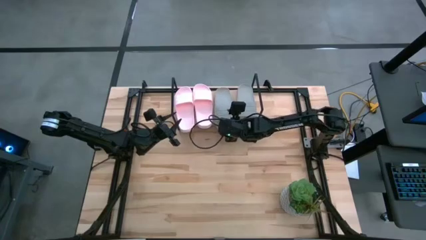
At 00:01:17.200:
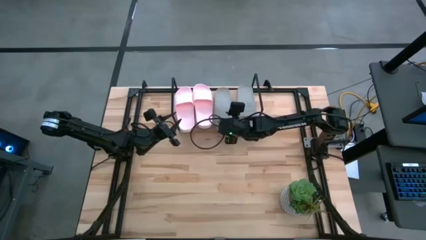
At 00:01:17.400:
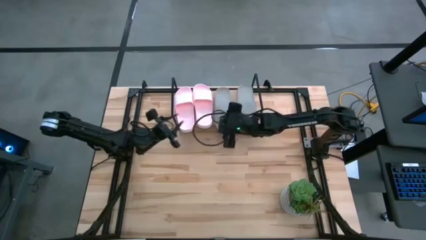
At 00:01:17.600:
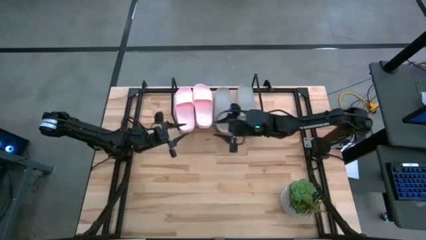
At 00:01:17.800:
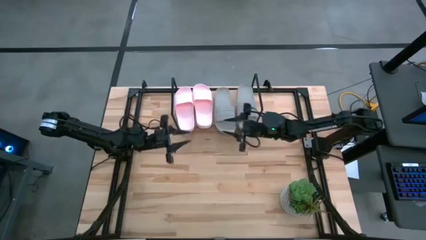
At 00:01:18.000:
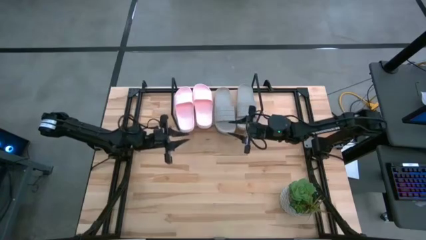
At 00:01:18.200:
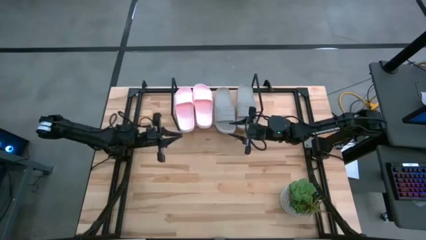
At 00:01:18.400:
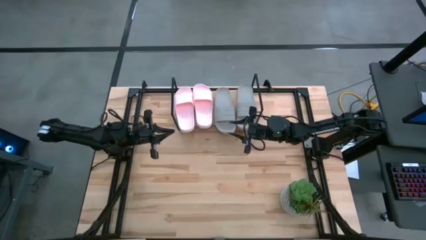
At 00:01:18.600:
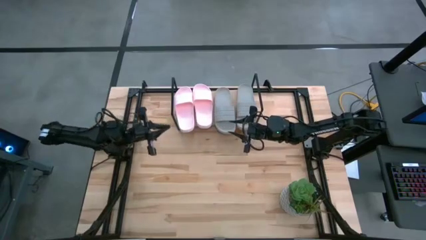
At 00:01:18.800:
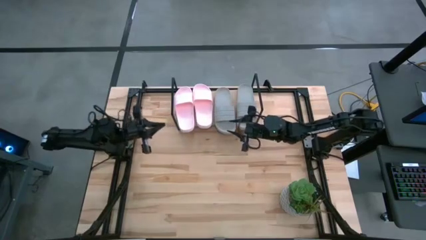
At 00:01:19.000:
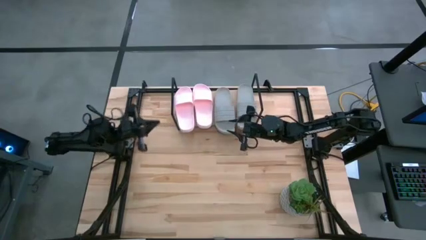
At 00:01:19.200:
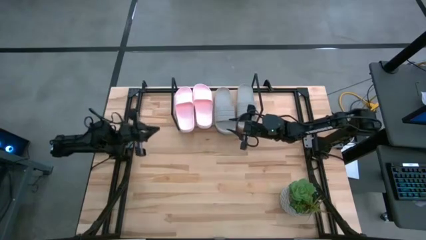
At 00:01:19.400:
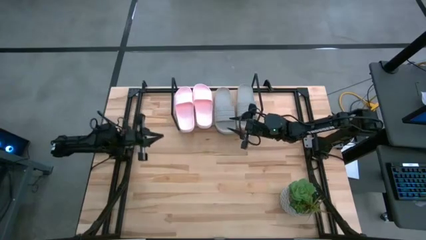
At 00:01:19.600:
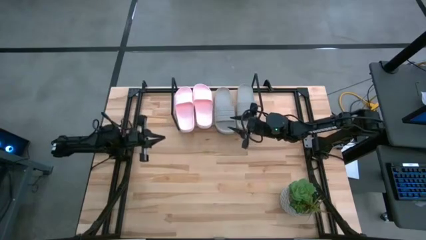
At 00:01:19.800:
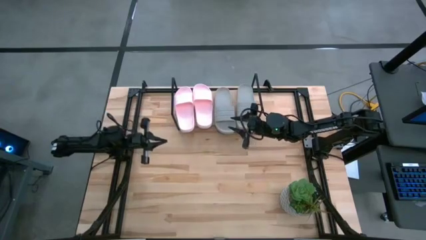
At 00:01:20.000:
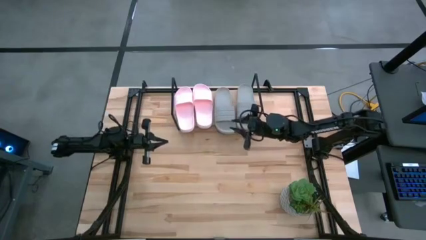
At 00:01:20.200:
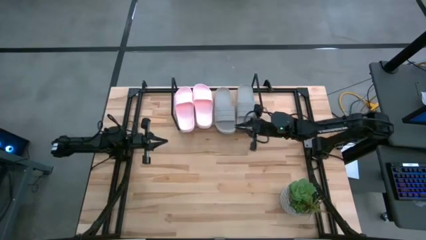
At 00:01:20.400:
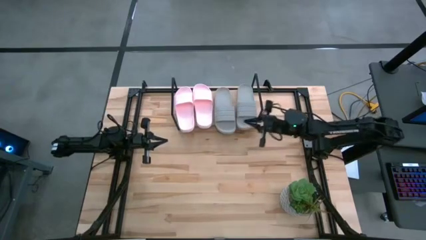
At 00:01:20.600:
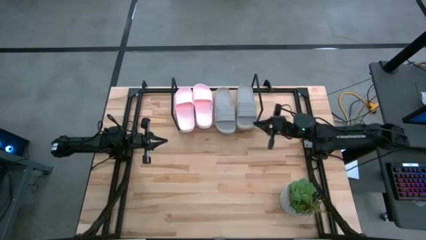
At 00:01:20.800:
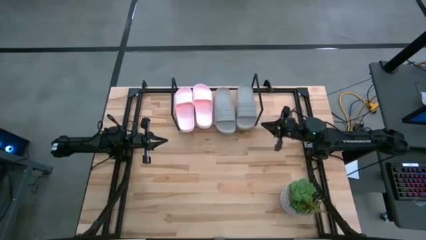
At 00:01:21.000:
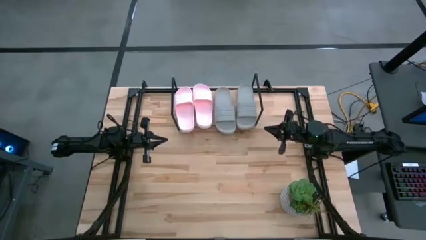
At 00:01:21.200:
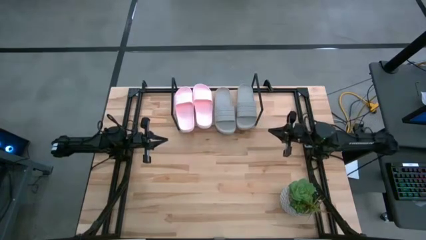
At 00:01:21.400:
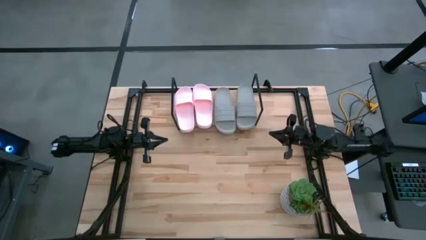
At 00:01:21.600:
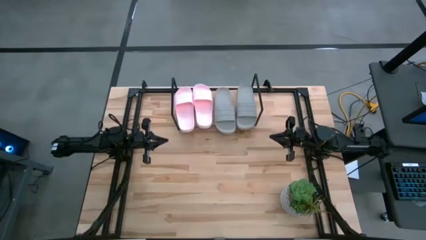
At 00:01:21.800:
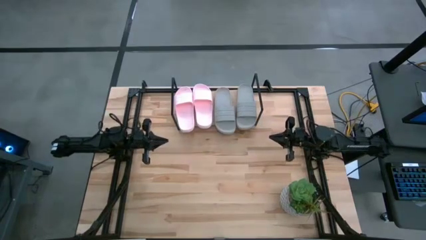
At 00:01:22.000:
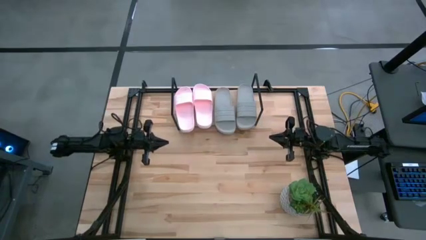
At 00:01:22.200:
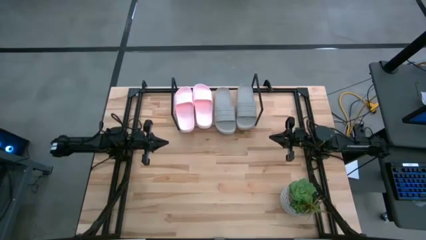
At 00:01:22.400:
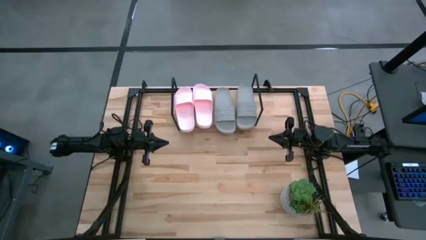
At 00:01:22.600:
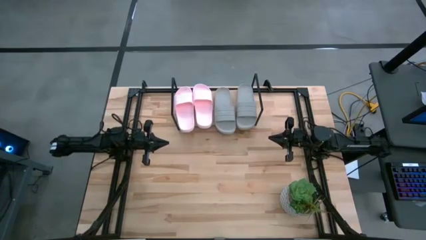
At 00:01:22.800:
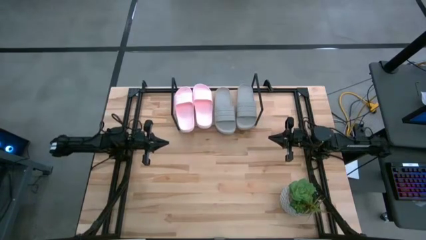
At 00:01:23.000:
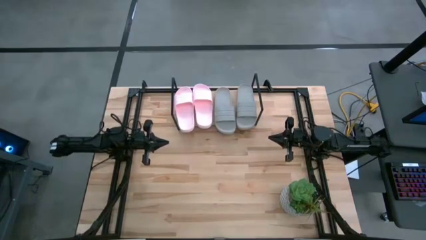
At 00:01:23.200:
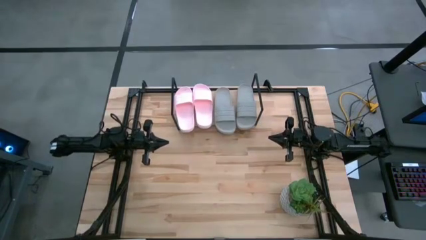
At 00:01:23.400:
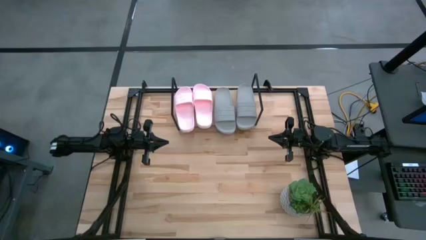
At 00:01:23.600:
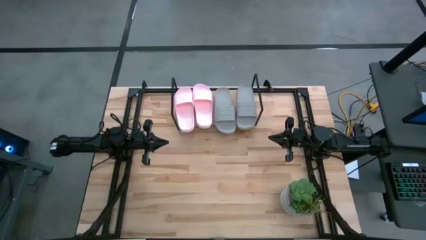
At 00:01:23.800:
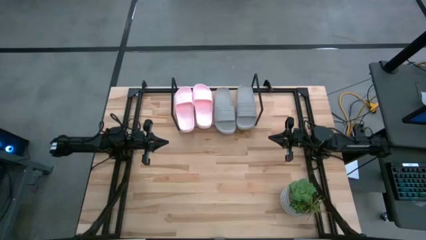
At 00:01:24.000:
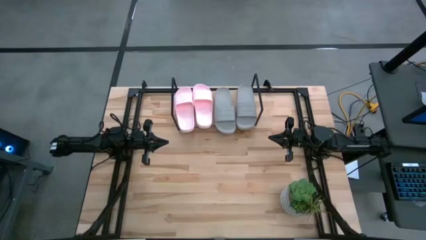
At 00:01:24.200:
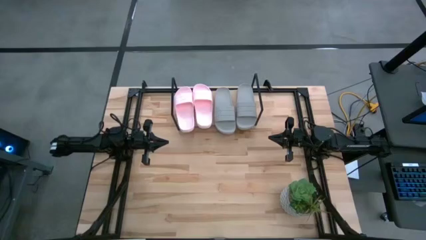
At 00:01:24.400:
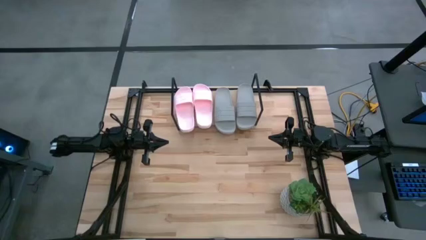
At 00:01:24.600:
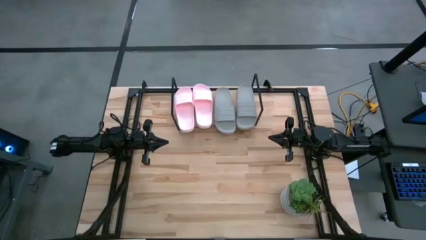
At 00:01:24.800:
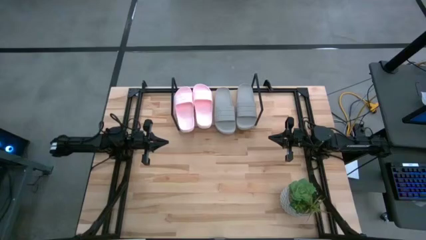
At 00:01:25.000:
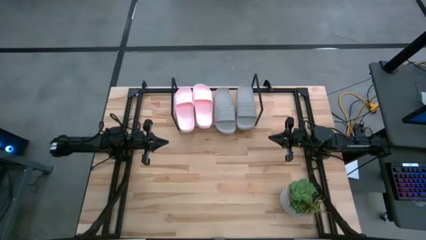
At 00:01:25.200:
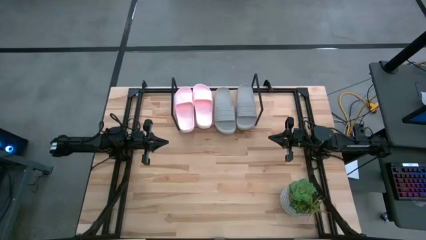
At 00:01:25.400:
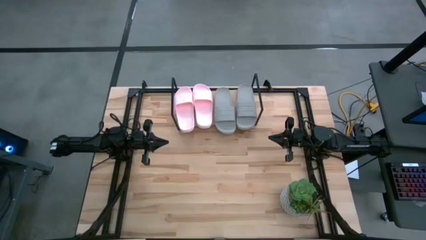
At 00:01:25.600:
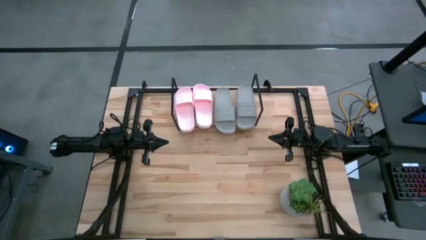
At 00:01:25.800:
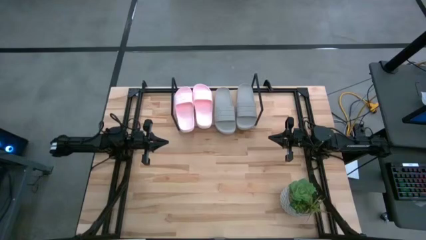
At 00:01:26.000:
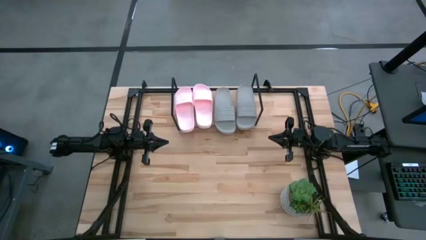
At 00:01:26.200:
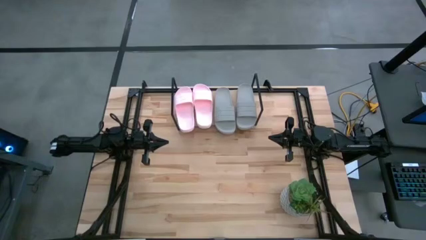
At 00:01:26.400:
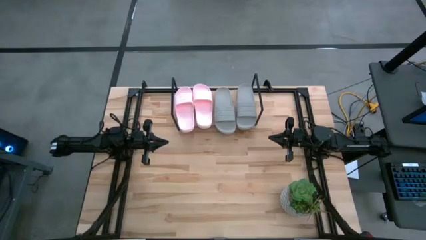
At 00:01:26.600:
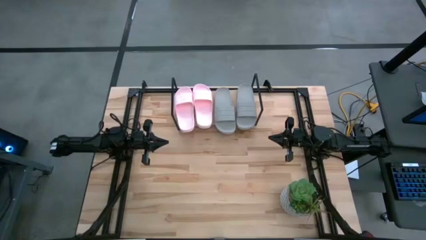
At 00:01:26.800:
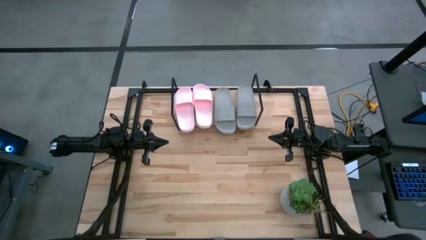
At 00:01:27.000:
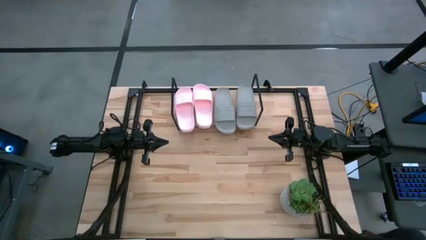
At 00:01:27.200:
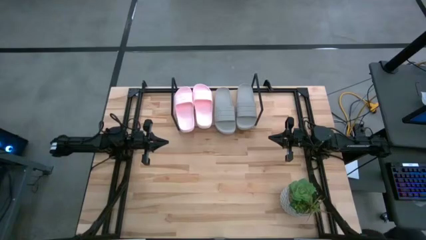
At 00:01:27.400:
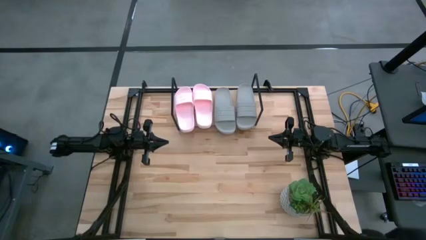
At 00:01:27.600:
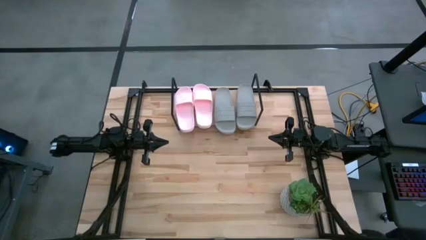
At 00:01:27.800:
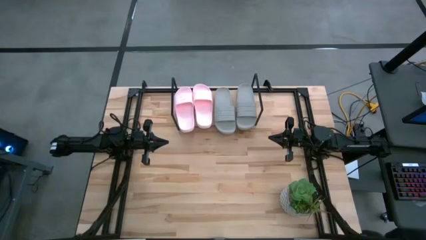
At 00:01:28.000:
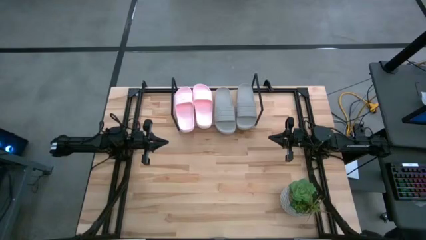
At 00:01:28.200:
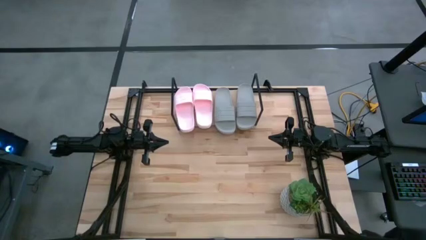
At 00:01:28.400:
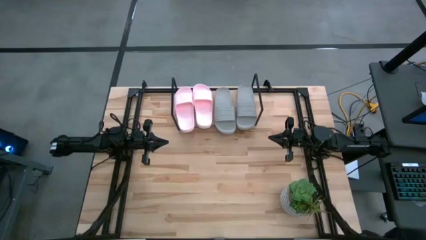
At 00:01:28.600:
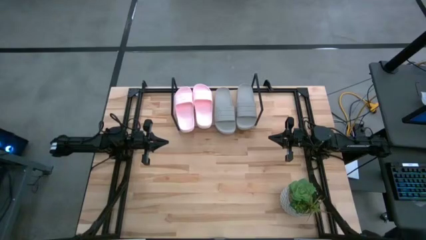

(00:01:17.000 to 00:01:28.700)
Task: Pick and place slides into the shelf
Return to Home Position

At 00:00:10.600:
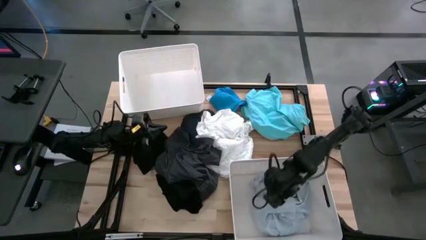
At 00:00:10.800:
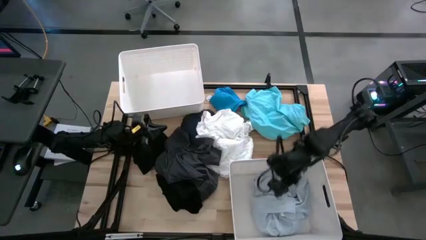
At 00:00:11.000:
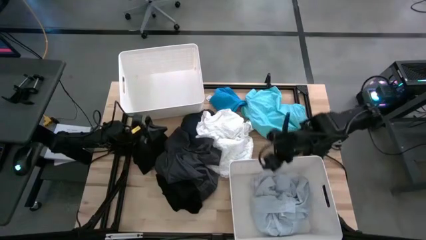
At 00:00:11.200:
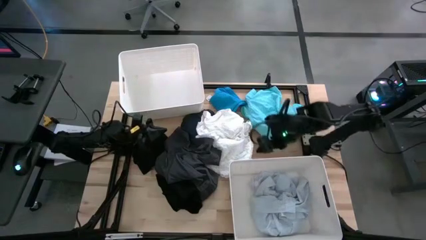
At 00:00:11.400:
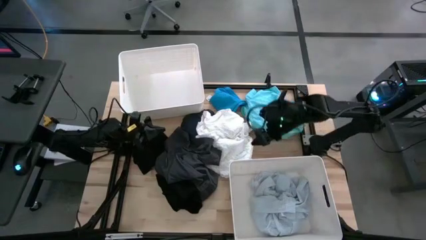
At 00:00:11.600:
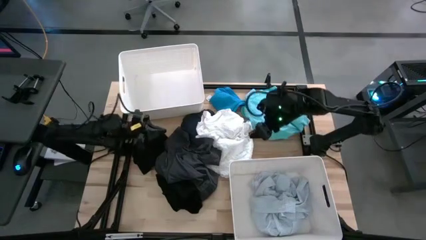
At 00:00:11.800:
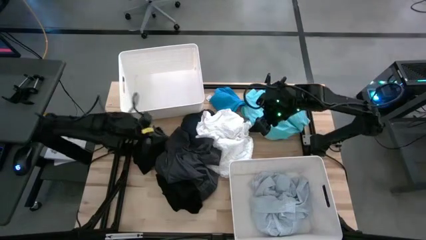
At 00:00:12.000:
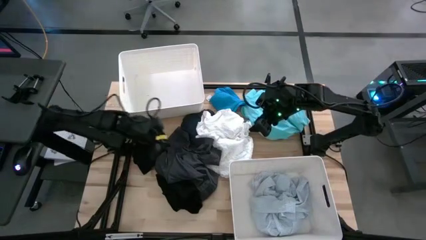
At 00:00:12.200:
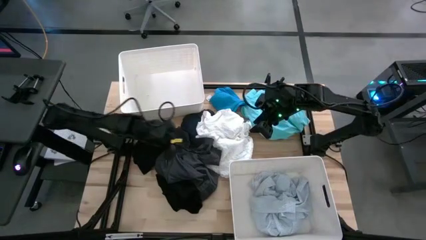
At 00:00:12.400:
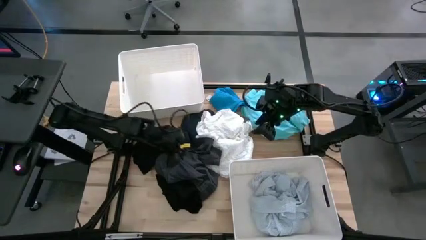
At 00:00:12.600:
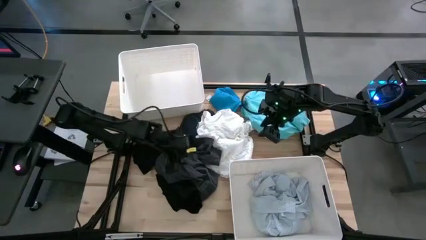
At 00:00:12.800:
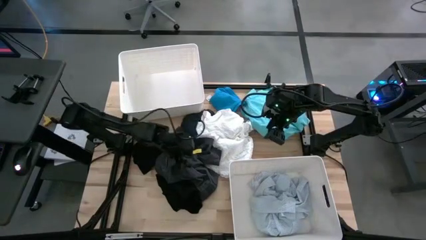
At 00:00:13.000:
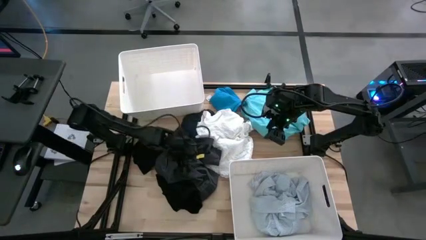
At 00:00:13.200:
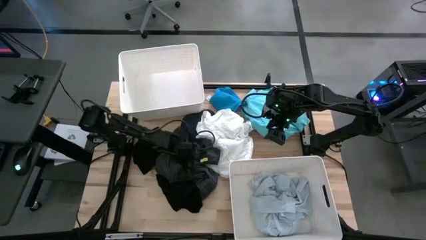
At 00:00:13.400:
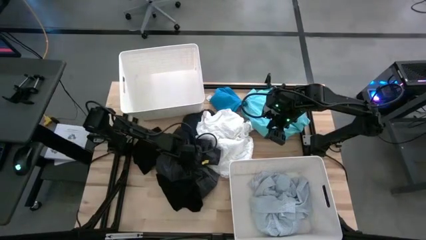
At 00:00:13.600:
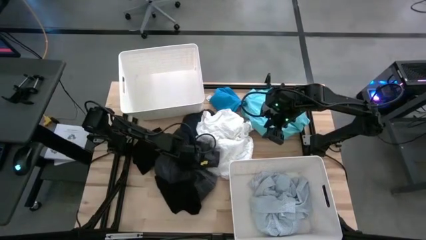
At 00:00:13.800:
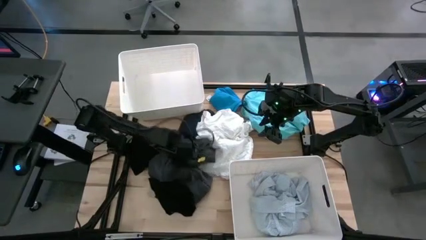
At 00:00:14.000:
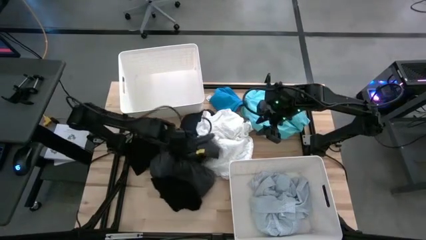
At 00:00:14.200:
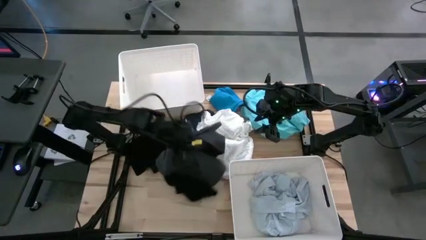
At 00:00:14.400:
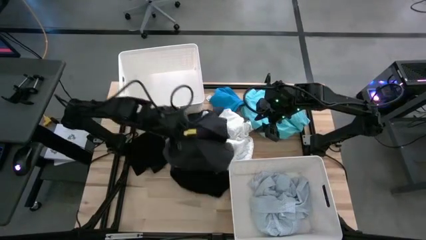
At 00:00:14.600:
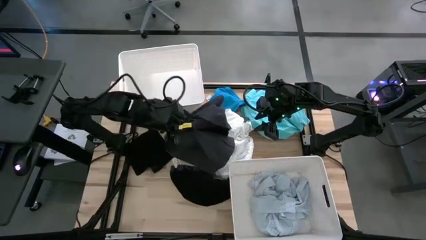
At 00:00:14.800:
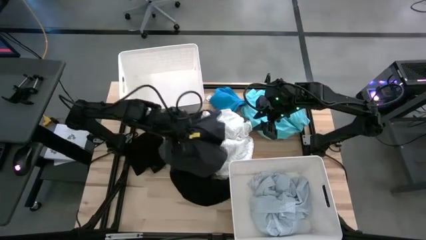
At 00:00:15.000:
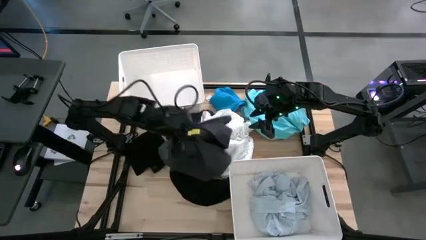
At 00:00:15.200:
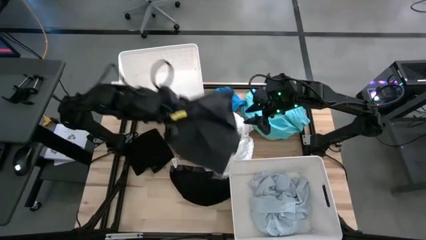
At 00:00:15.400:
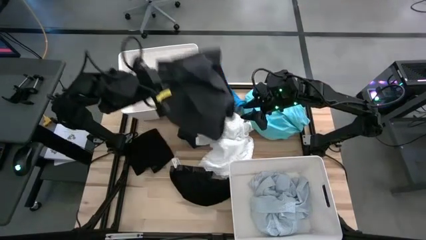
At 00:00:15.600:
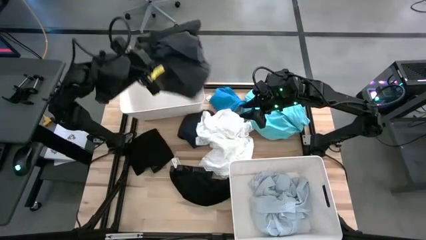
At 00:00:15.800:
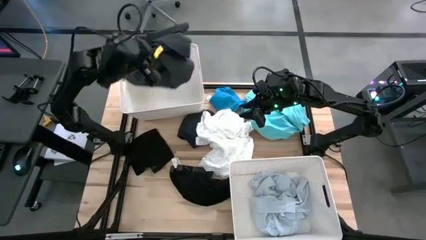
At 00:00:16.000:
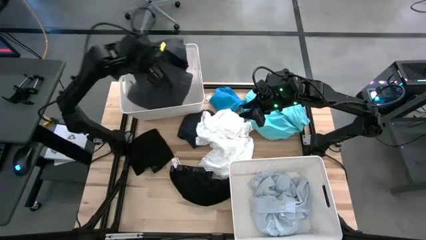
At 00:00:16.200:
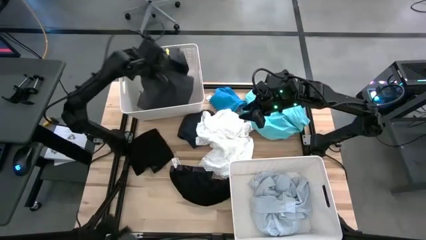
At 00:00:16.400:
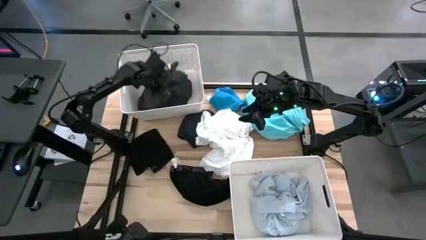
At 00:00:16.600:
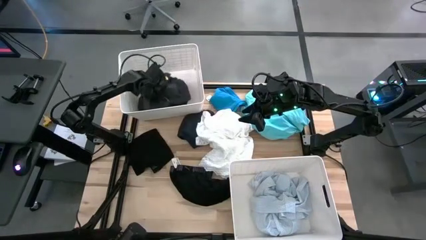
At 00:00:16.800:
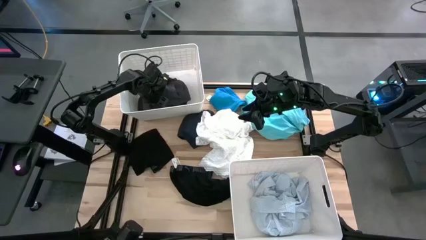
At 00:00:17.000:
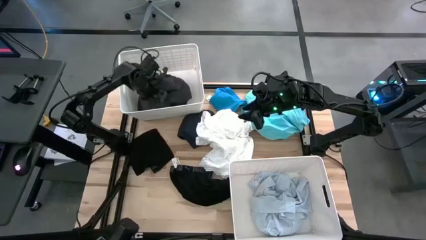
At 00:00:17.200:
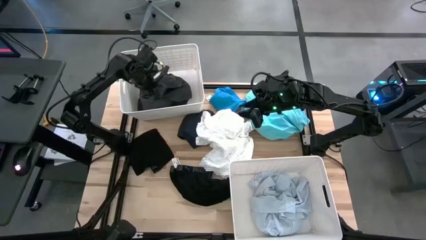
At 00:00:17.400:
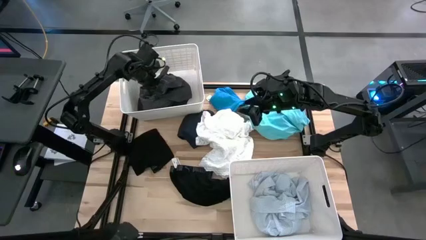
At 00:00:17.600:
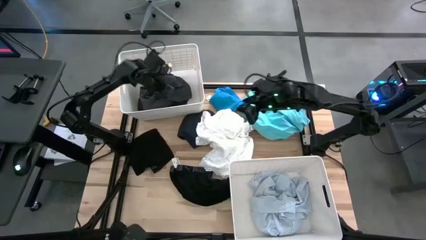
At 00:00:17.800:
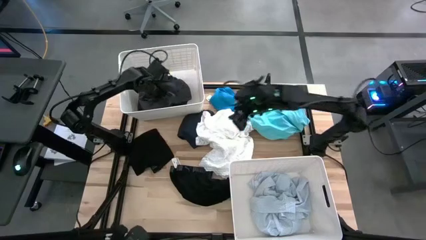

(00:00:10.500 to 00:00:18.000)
Task: Sort clothes
Put the black short into the top white bin
